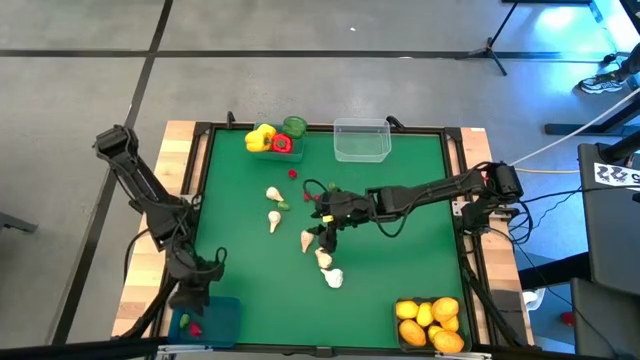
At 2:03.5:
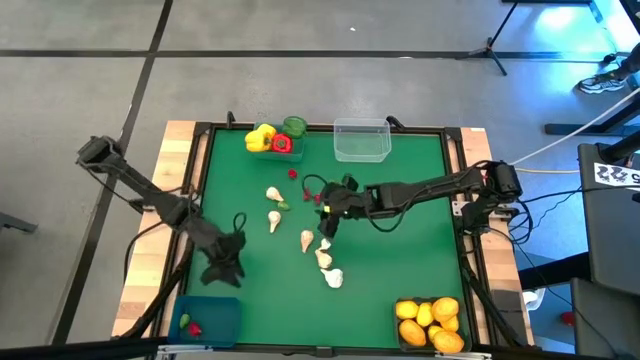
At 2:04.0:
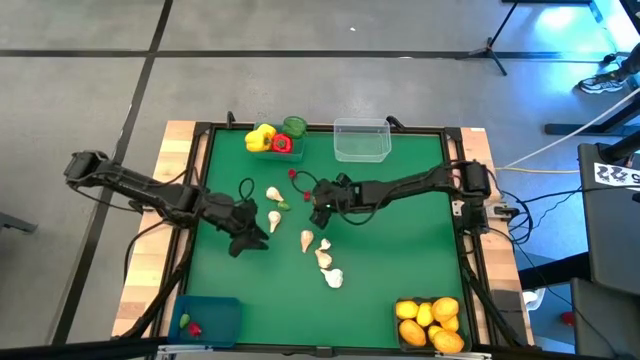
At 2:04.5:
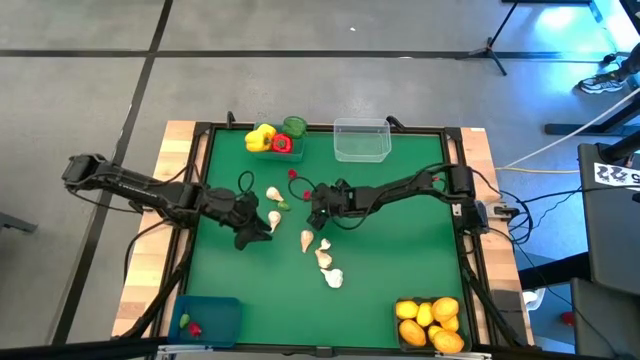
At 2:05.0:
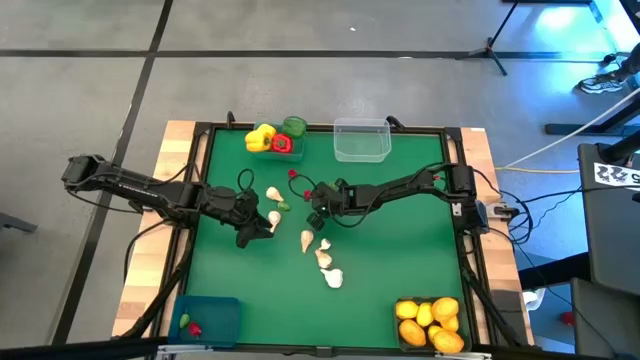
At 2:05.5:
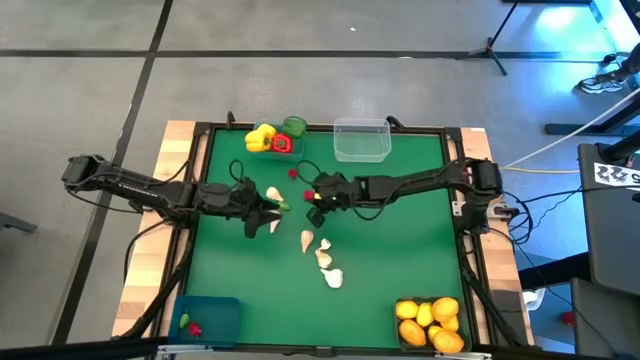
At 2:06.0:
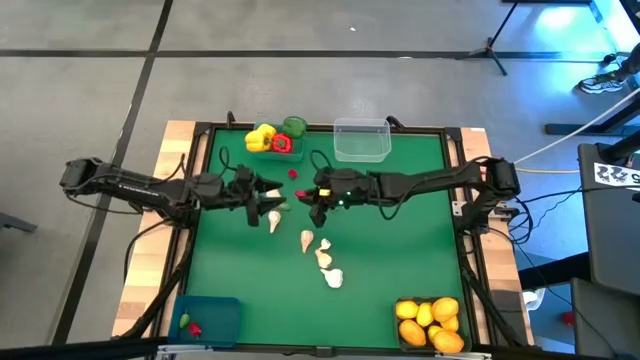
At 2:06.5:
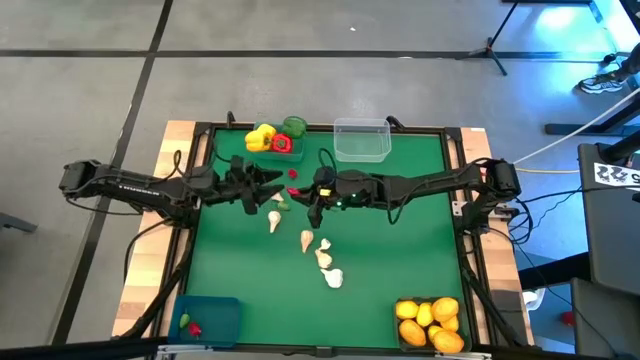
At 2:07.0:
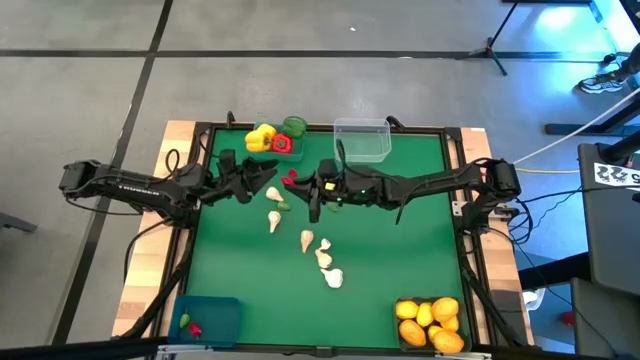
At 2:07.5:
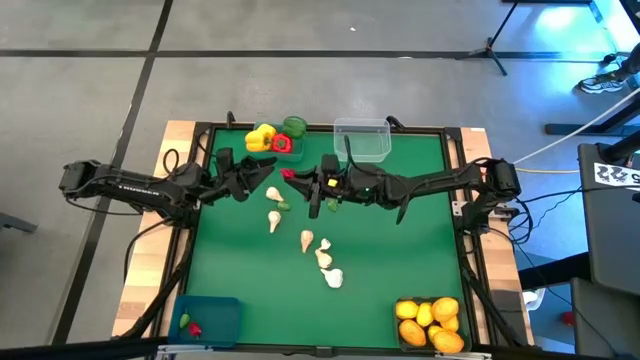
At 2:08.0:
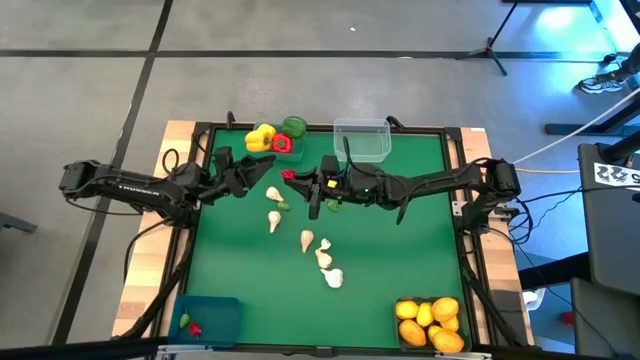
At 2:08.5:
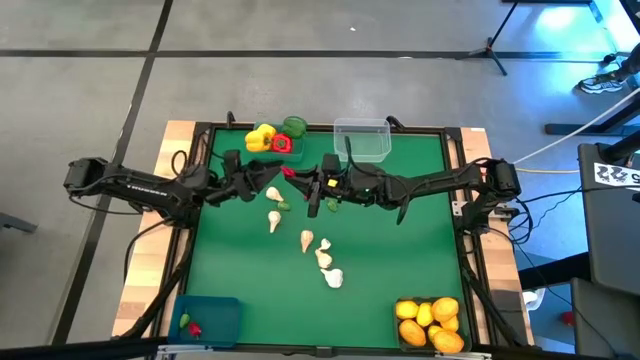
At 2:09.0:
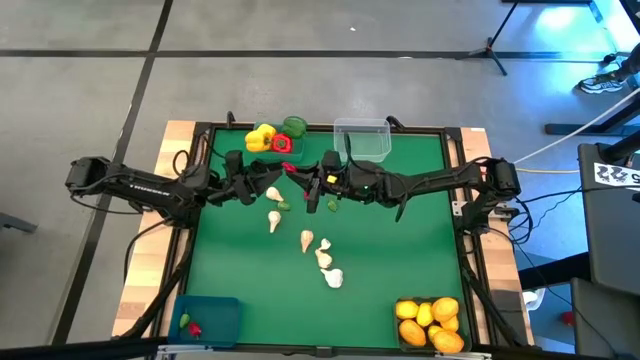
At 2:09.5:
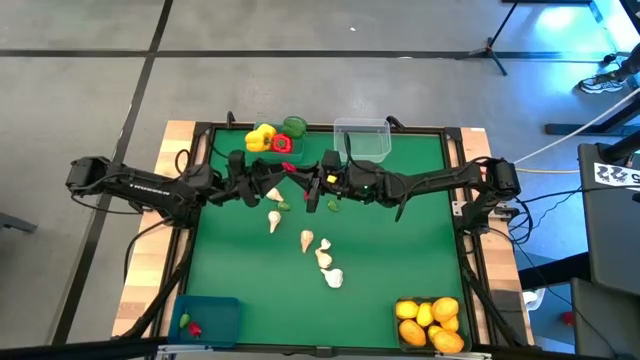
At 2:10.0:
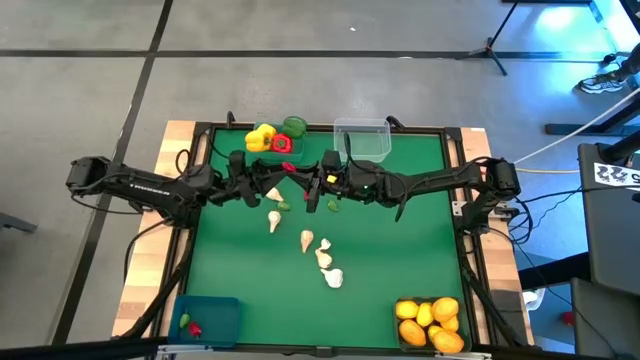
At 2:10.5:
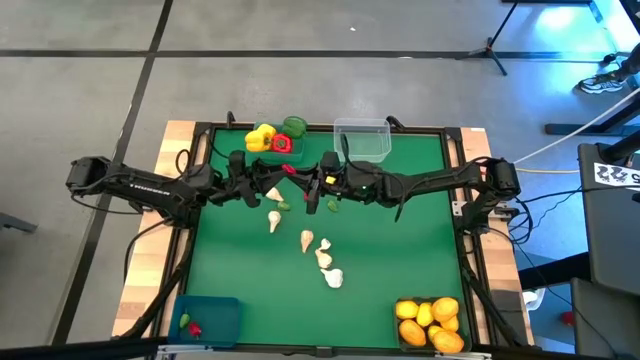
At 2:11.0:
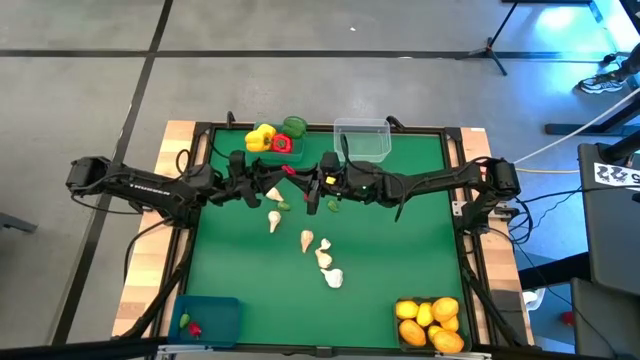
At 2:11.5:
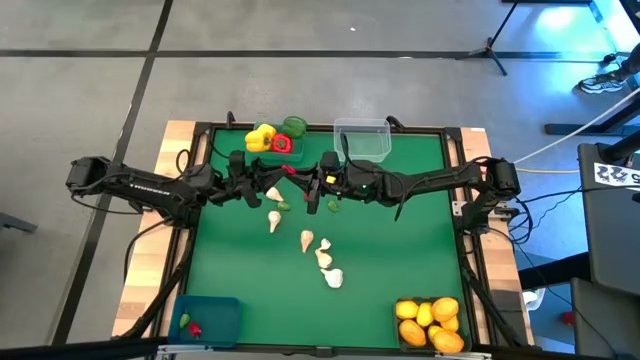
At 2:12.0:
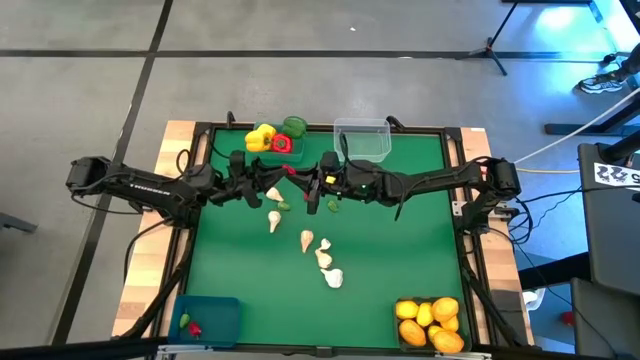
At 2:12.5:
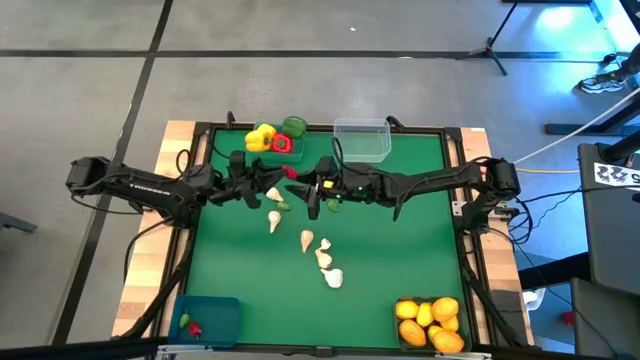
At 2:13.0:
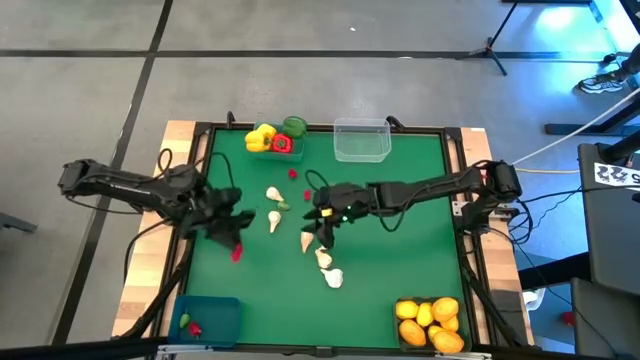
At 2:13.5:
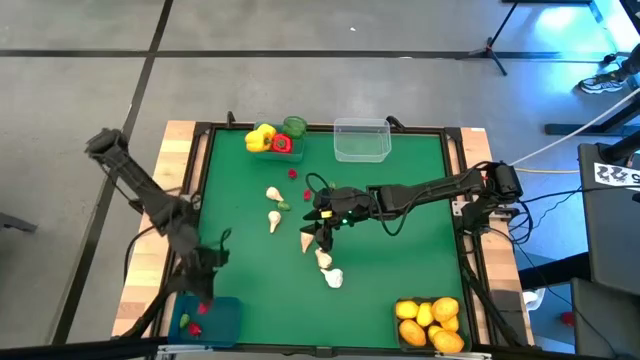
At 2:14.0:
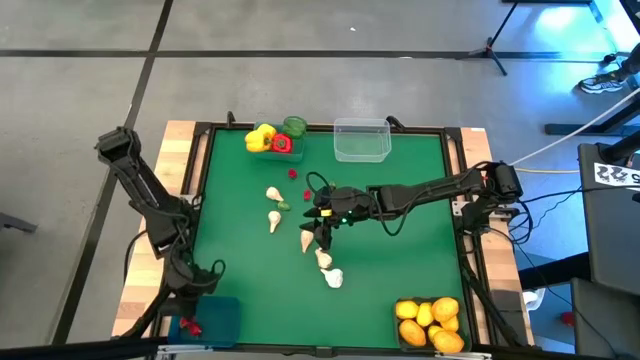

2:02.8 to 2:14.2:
Task: Sort produce into baskets
Put the red chili pepper into the blue bin

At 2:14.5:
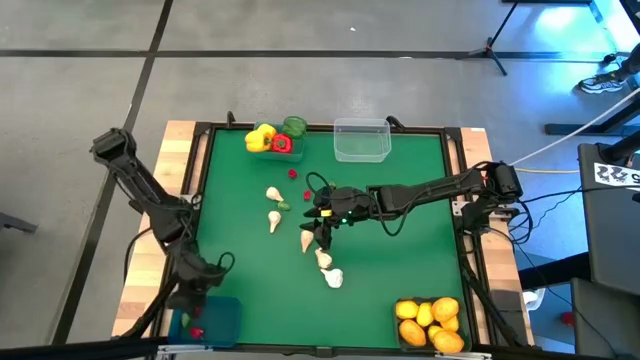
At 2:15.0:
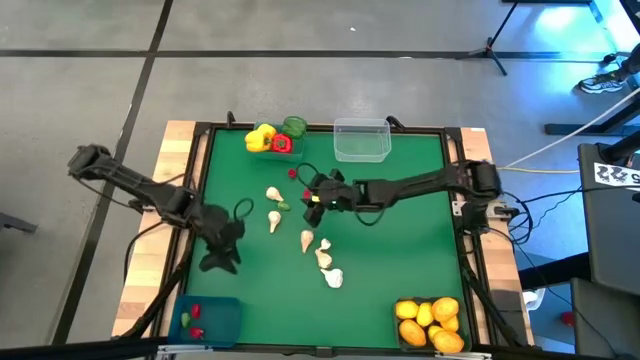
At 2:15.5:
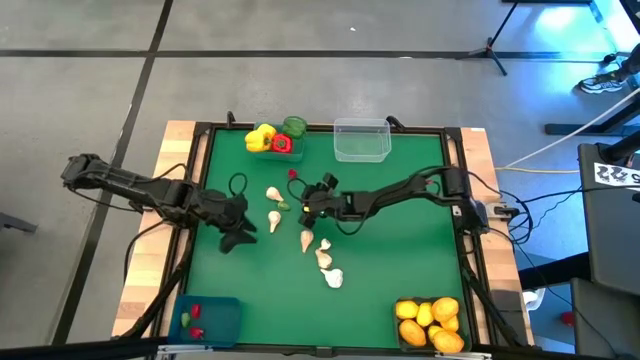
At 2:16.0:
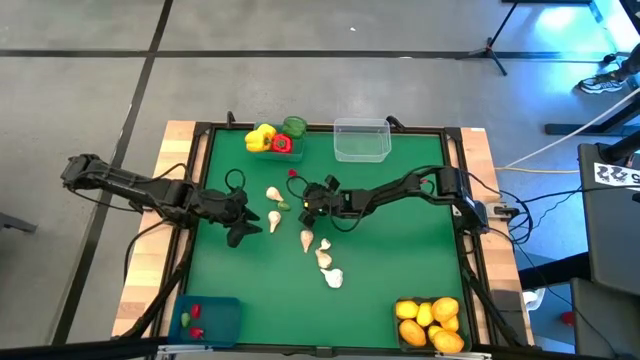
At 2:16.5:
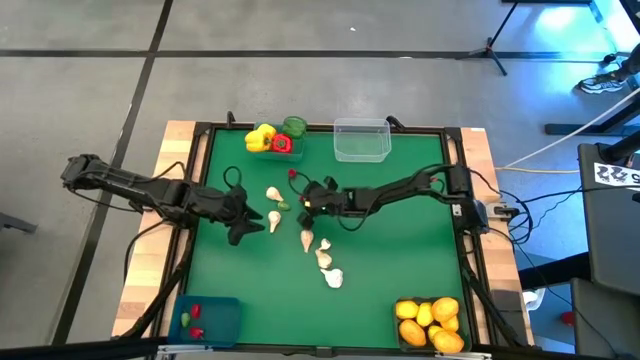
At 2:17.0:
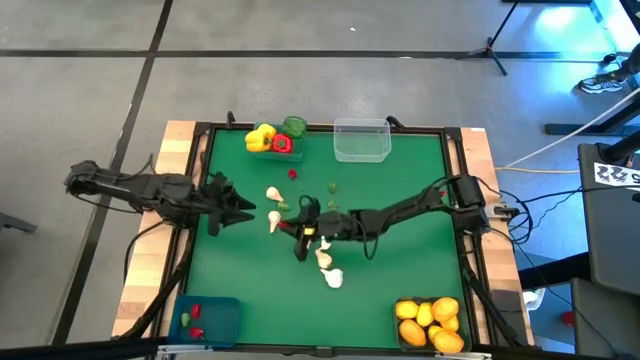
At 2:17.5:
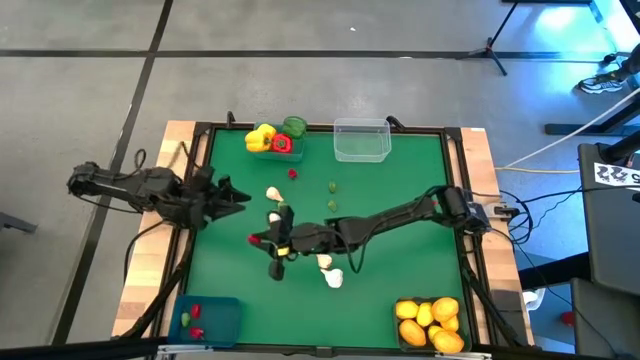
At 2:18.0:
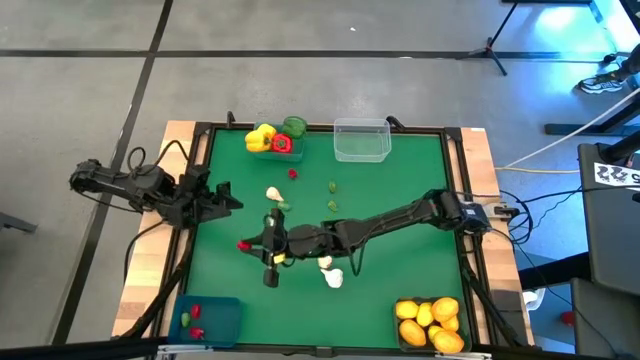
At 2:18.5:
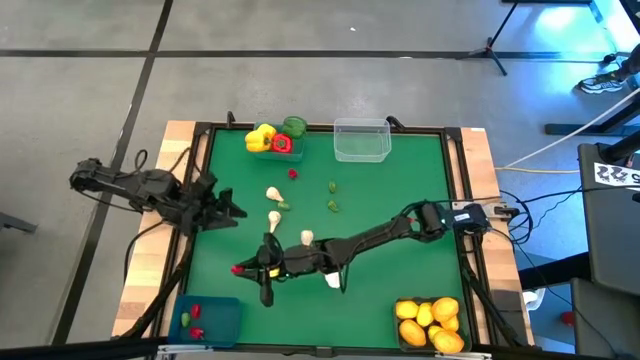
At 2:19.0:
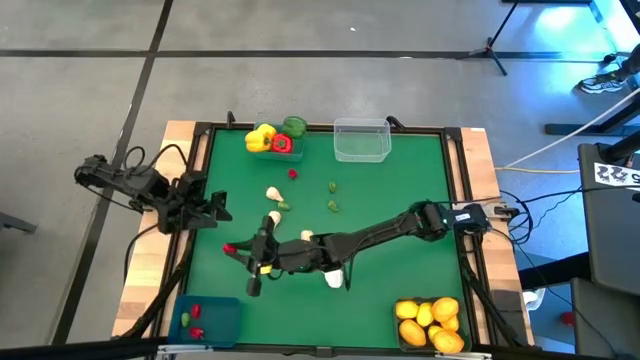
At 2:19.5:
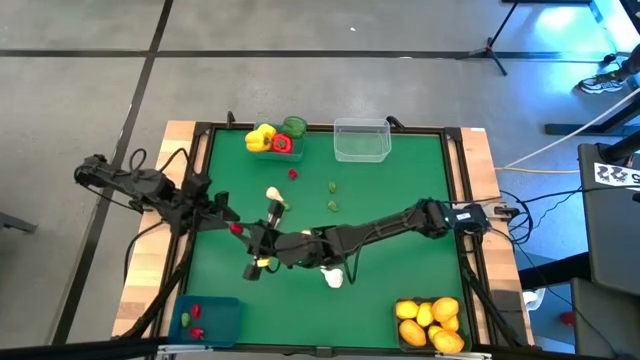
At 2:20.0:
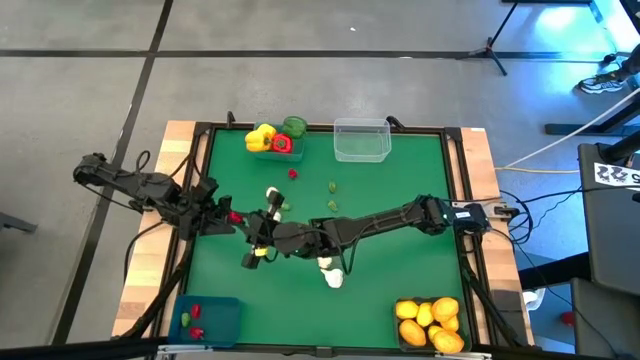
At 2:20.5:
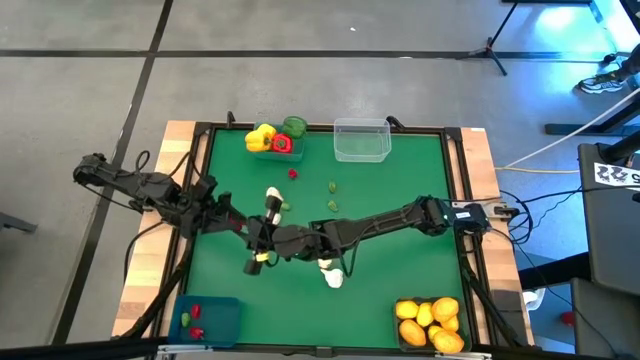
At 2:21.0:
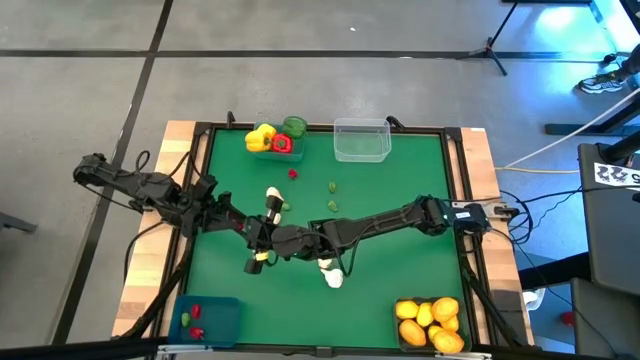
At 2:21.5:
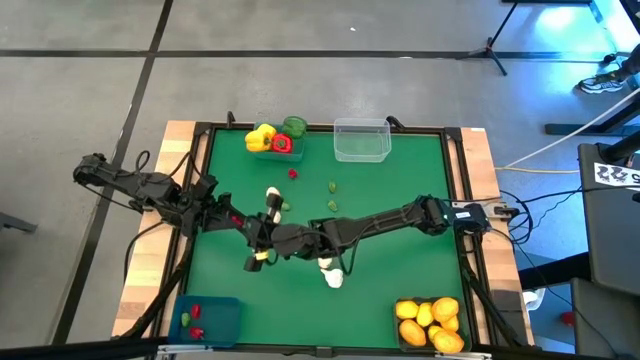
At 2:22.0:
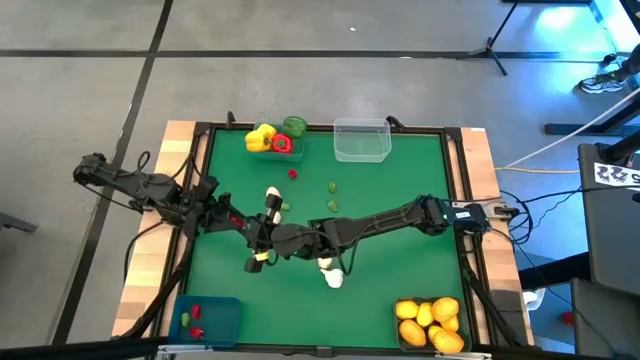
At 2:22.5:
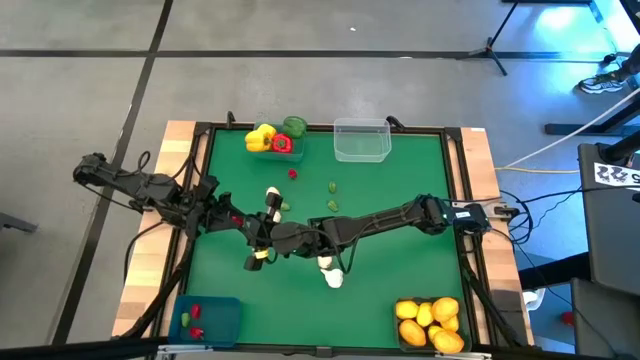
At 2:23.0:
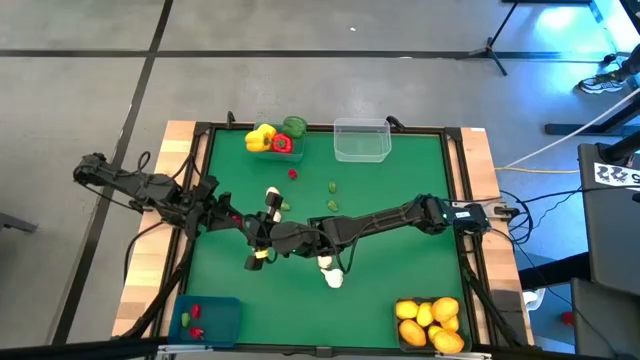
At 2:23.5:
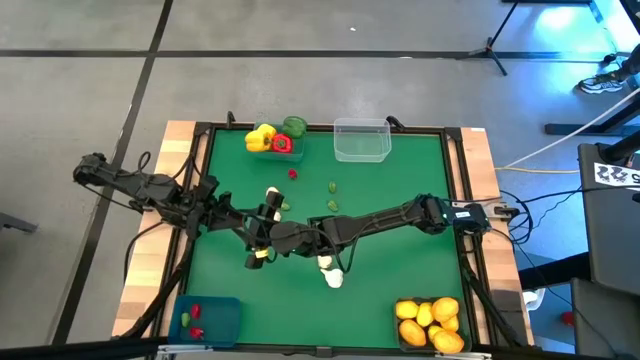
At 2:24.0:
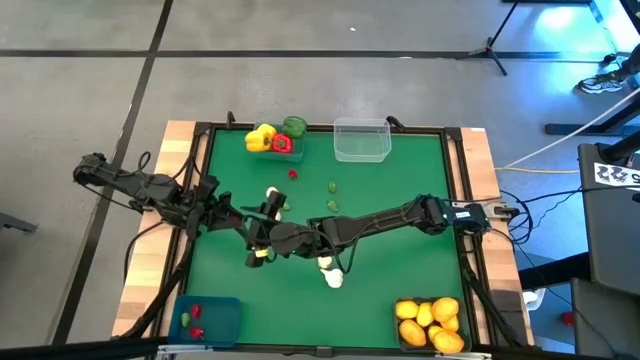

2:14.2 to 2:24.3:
Put the red chili pepper into the blue bin
